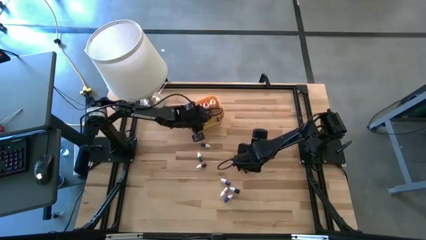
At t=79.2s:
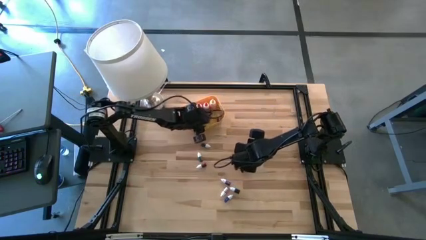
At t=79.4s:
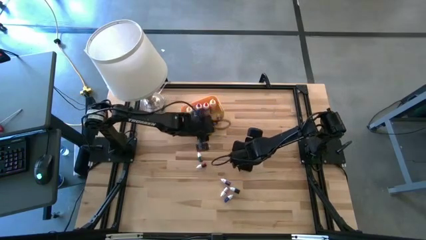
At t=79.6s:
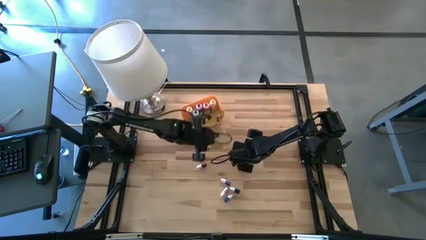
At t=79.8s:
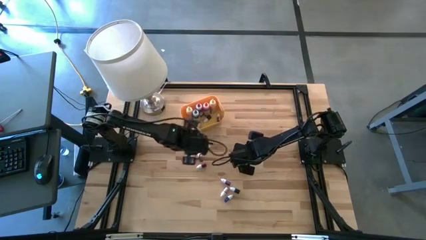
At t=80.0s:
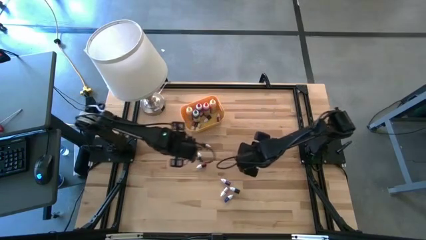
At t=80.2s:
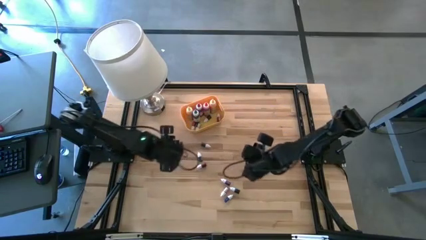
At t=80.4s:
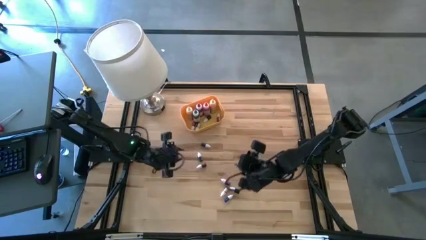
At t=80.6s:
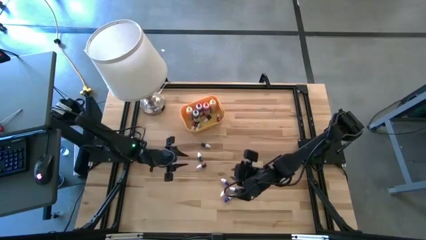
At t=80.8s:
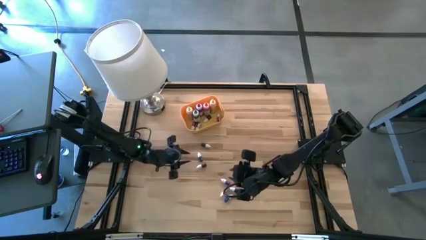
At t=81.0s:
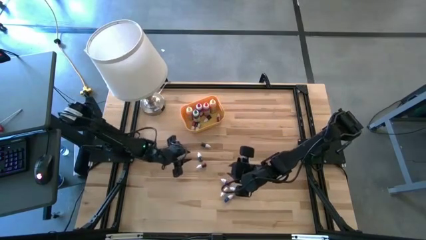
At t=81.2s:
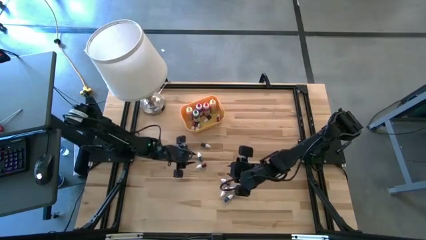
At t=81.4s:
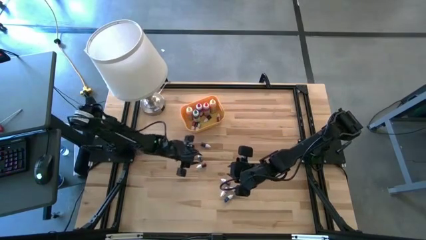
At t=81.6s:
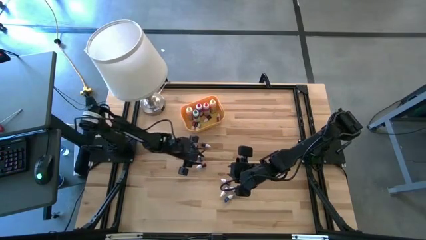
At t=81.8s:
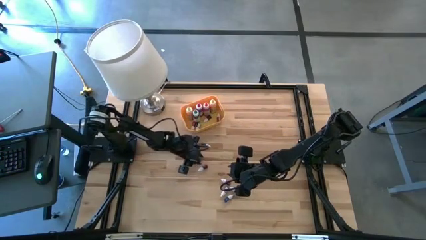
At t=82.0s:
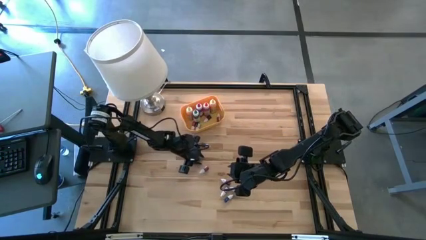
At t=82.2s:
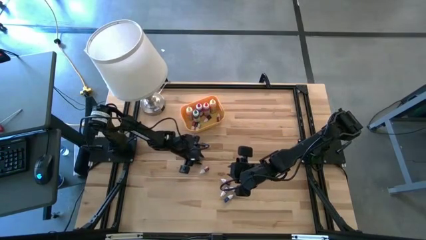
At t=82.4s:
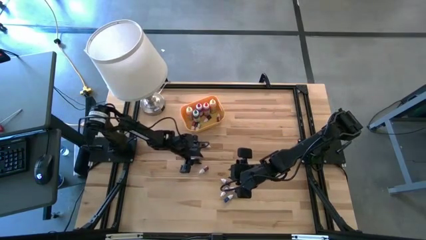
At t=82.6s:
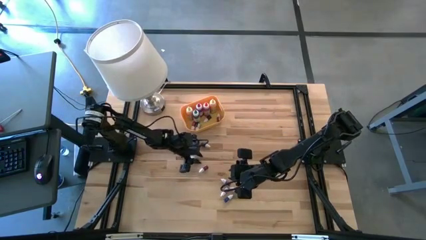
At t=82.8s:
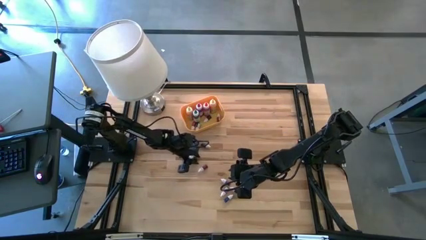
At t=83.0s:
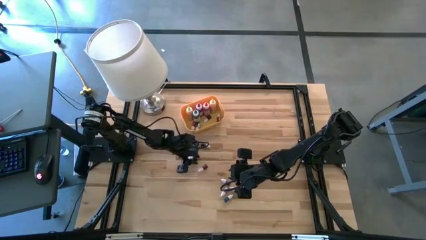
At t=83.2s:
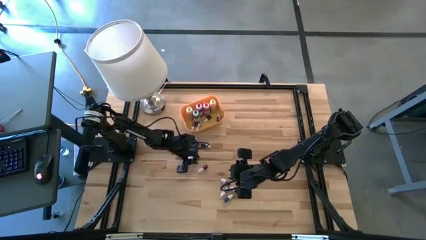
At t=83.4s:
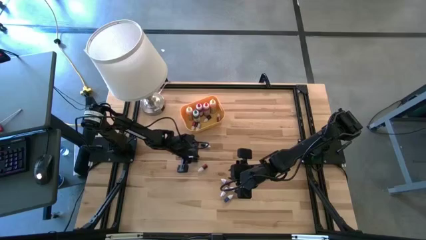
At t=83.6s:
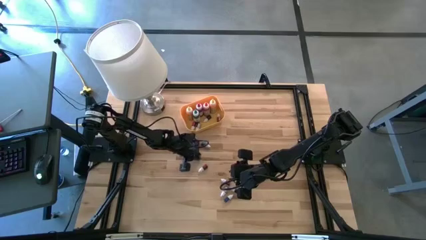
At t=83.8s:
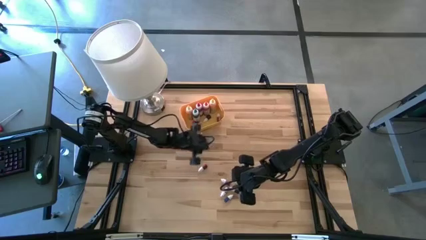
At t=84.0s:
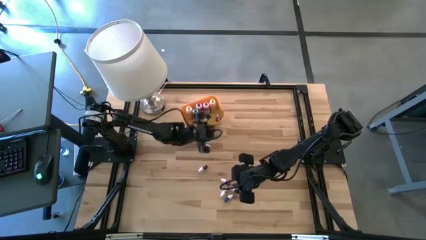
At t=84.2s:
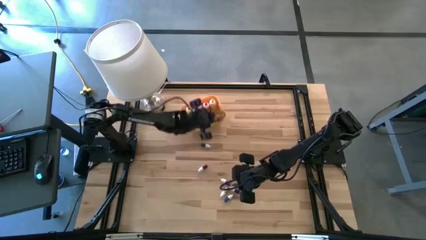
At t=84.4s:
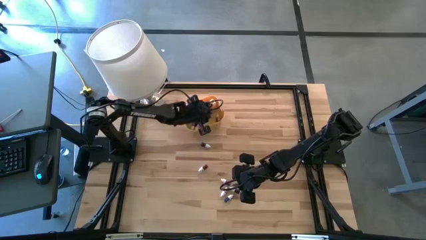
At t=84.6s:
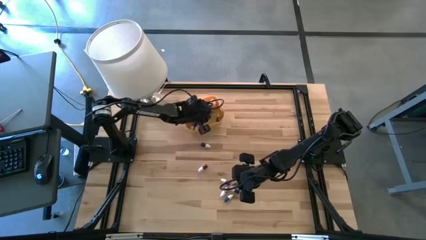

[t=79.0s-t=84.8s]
Task: Pick & Place food coloring
Put the top small green food coloring bottle into the bin

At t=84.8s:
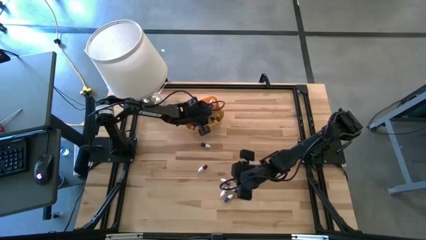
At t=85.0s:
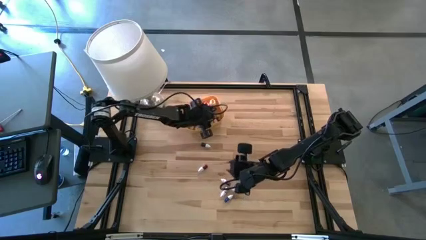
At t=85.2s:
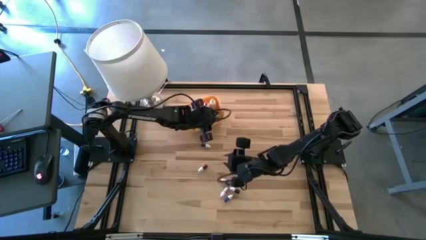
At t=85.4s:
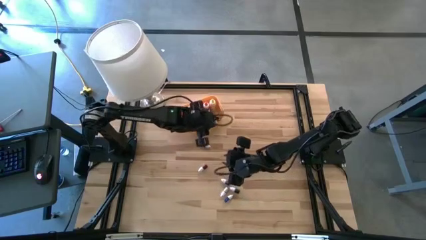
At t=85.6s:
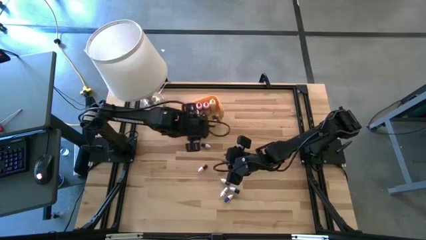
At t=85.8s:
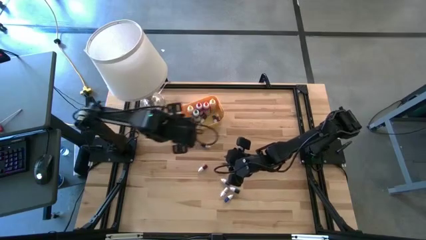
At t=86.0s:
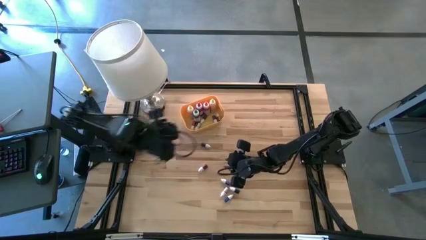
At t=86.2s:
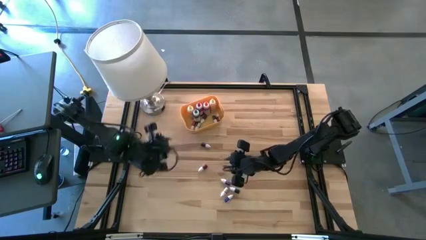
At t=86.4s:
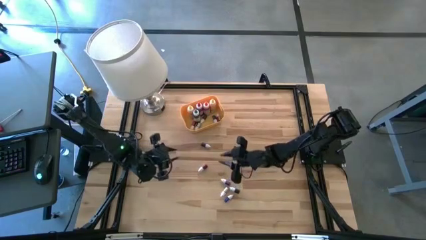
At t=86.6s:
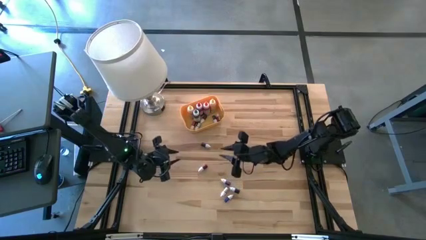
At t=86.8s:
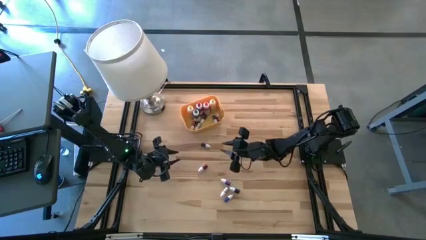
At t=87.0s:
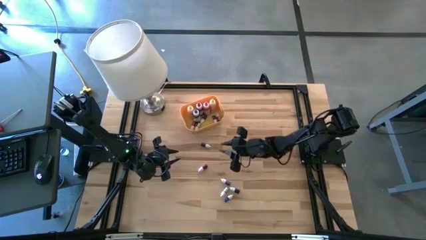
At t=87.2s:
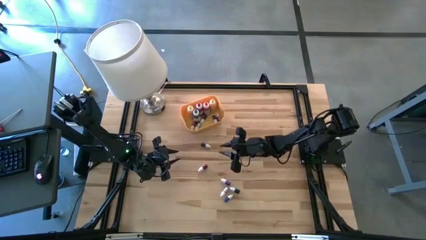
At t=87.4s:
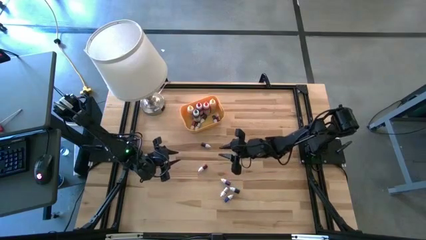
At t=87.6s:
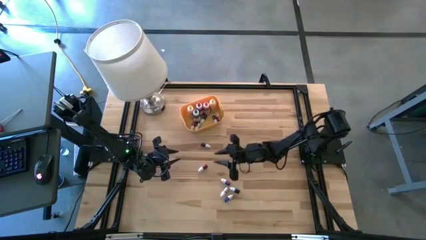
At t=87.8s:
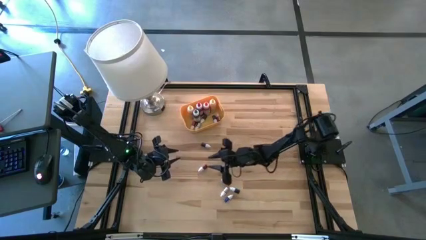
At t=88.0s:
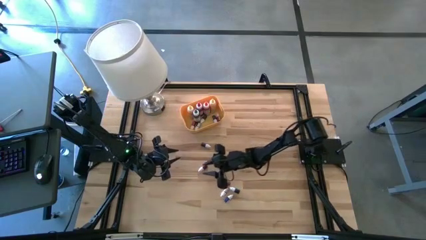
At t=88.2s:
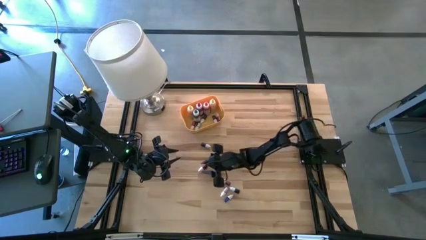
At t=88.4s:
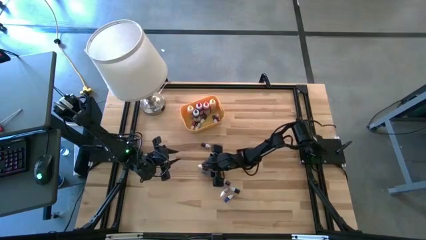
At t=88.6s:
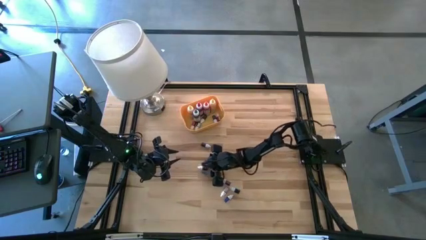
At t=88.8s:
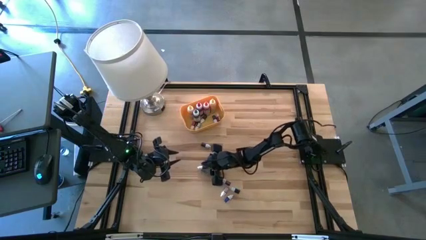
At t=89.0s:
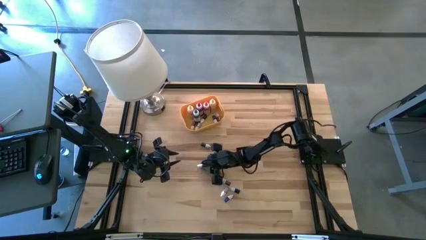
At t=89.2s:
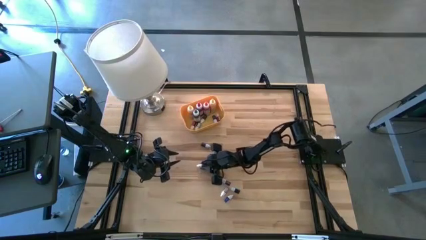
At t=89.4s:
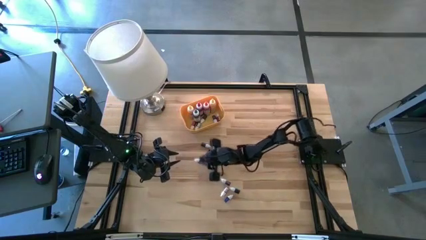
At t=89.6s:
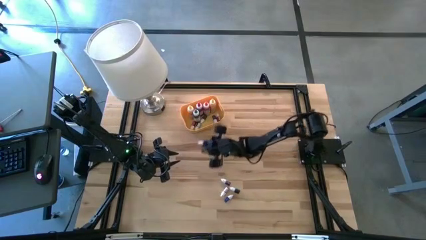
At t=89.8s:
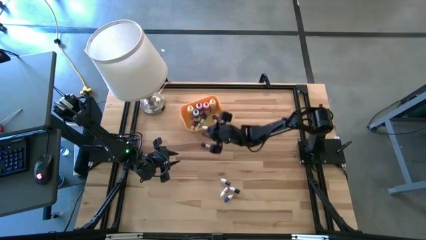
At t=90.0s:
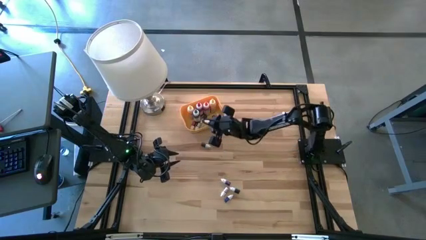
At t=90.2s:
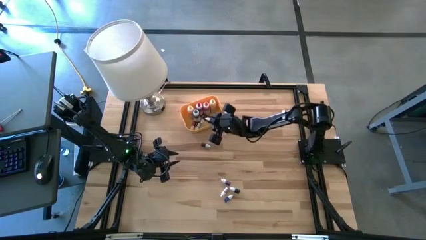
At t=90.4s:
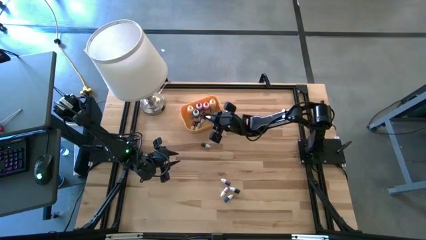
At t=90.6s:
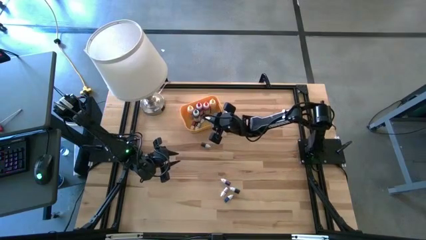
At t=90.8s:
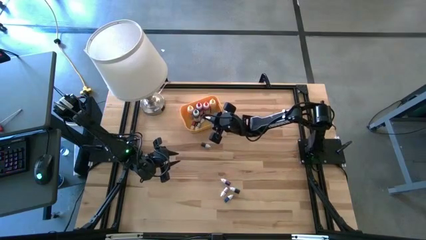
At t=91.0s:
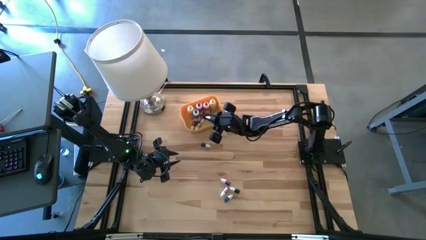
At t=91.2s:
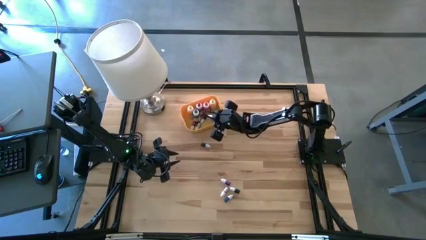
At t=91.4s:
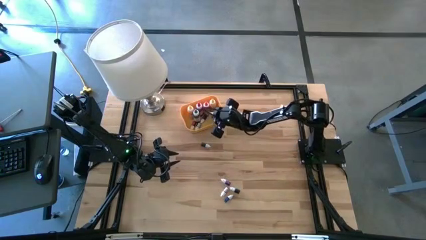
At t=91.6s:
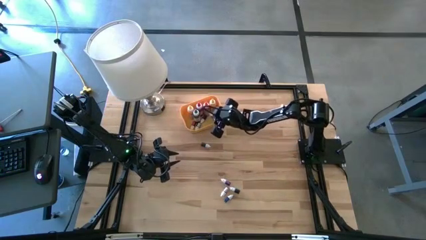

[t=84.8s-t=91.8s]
Put the small red food coloring bottle into the bin

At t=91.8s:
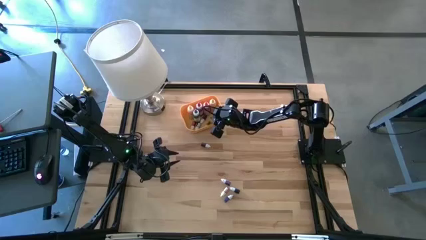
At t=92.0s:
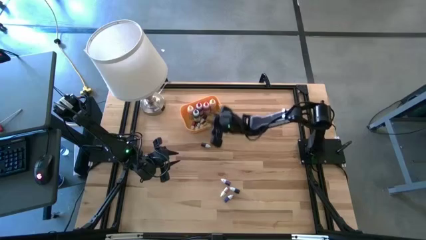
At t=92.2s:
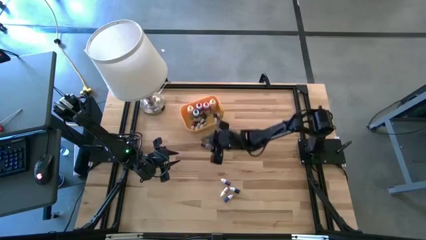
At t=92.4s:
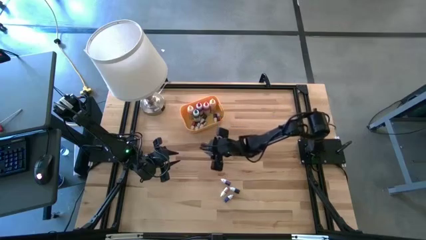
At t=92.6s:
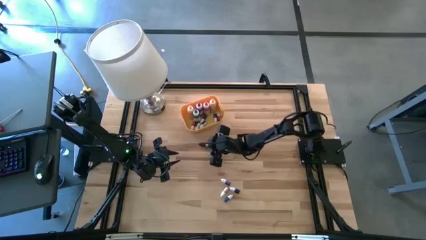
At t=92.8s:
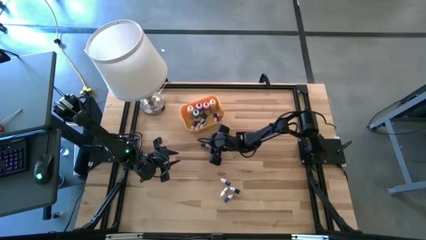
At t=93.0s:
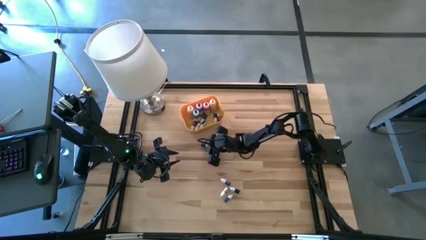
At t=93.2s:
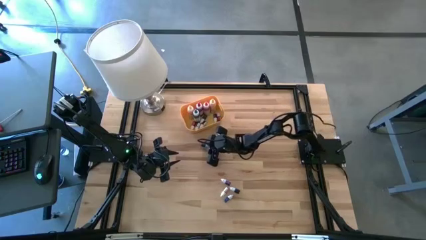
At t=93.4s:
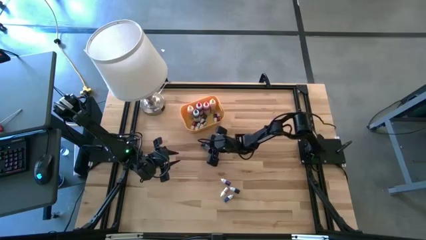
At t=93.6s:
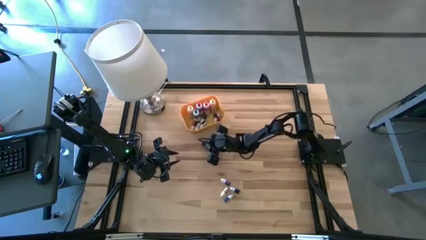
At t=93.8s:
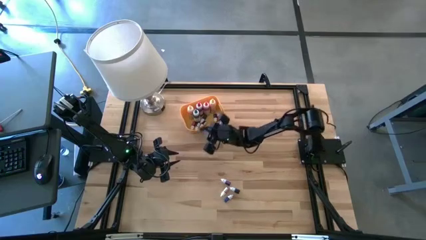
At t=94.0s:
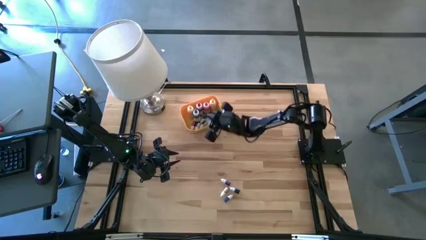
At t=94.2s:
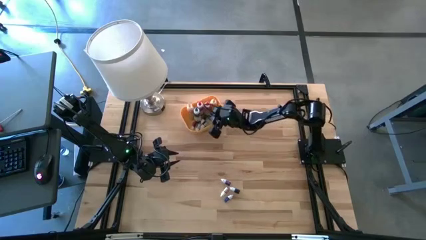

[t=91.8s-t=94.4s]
Put the small black food coloring bottle into the bin

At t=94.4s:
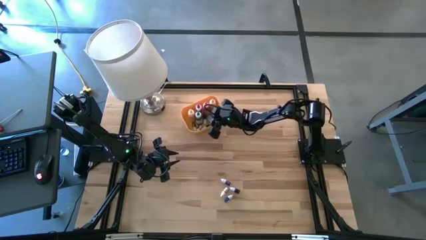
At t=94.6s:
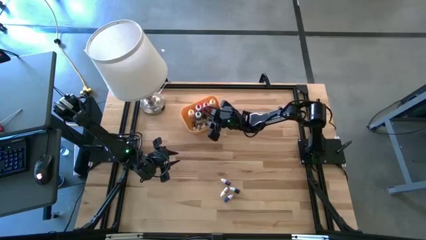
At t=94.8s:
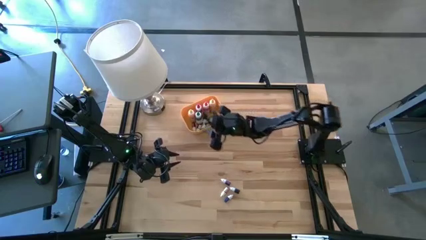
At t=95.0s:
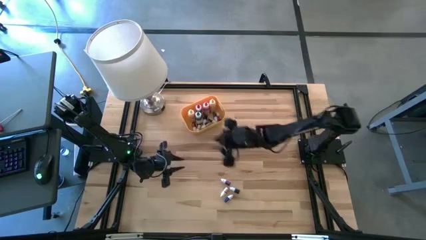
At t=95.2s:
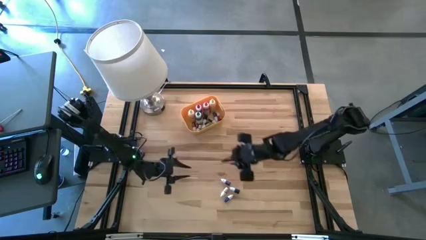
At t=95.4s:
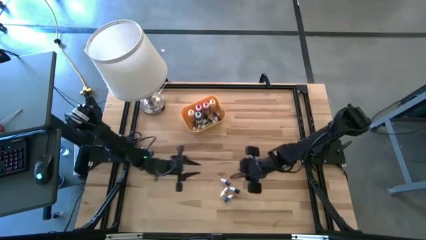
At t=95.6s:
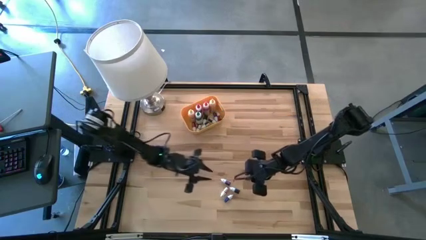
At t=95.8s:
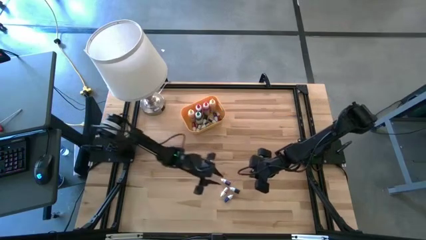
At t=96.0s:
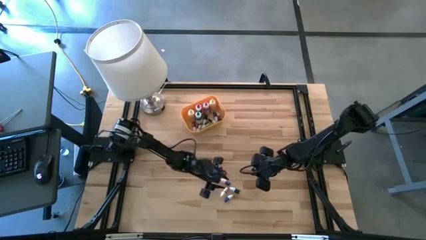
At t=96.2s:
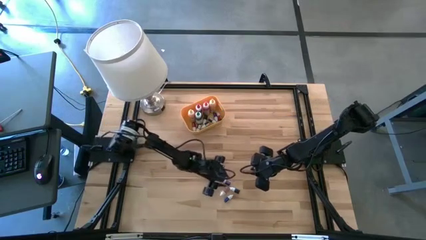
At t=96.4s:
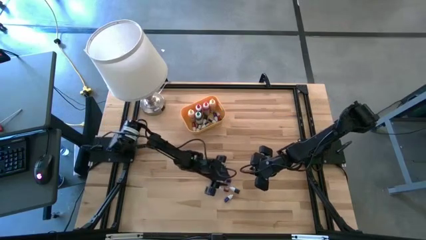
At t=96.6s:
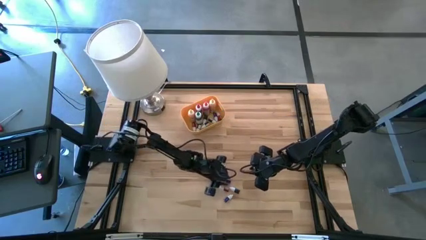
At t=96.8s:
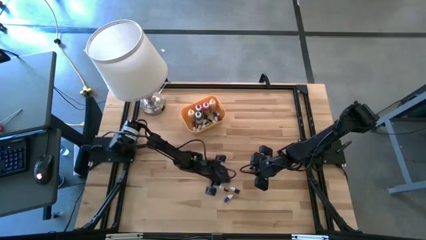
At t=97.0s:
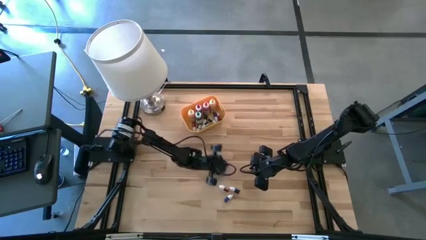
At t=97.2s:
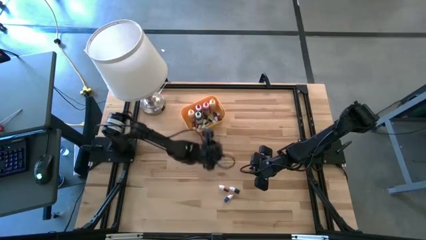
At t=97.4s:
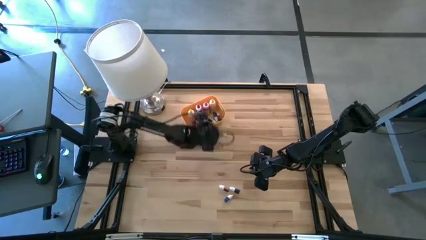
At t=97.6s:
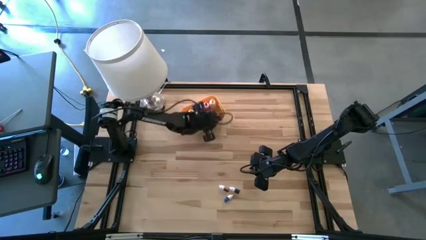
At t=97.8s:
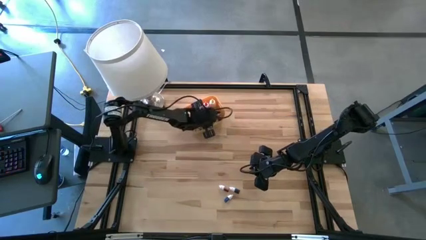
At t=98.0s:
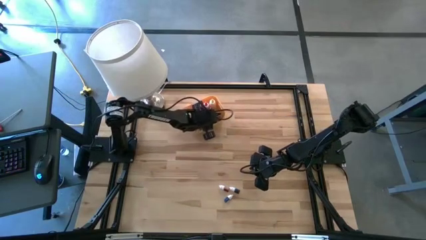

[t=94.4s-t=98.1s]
Put the small purple food coloring bottle into the bin
